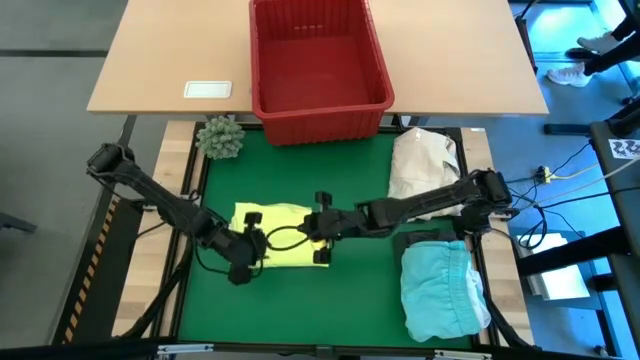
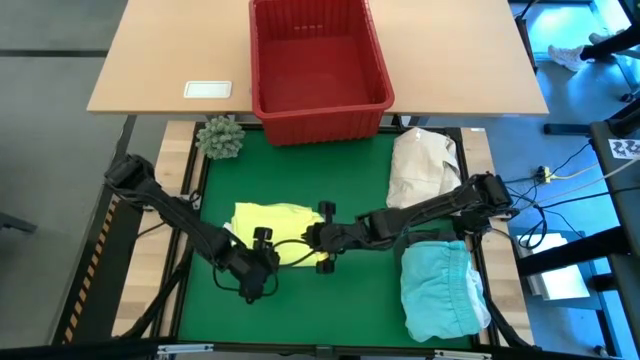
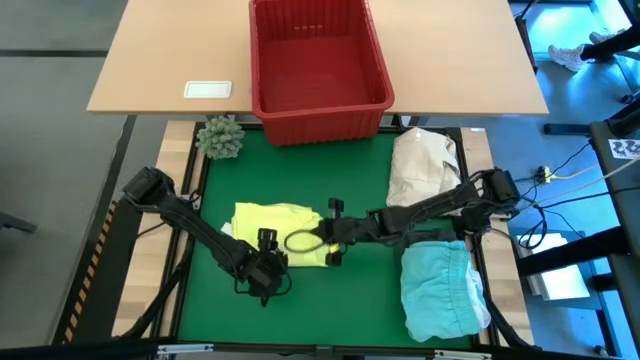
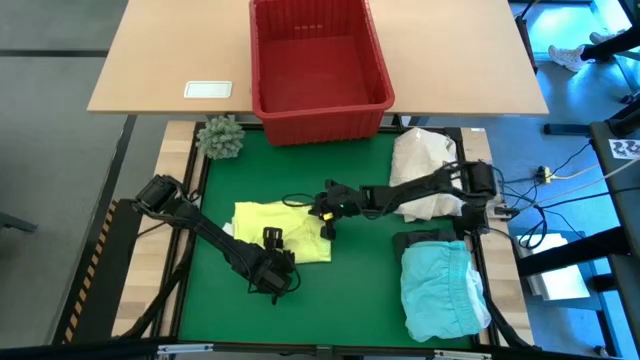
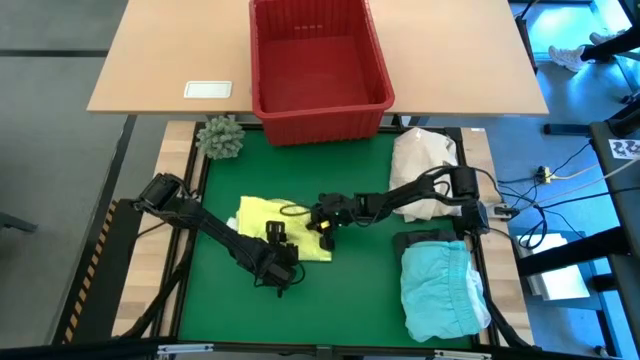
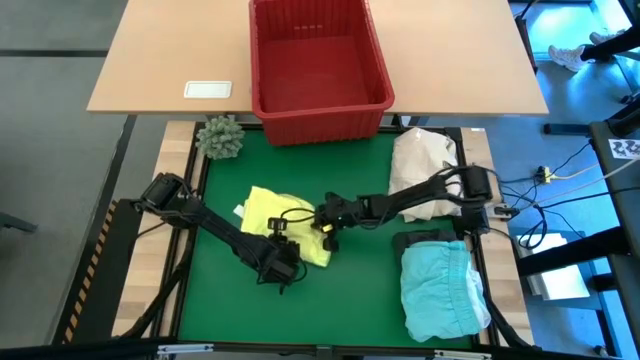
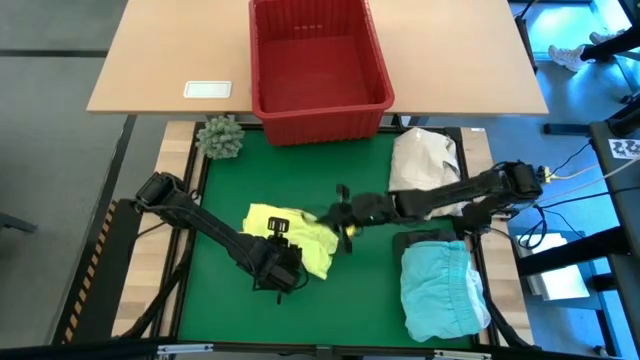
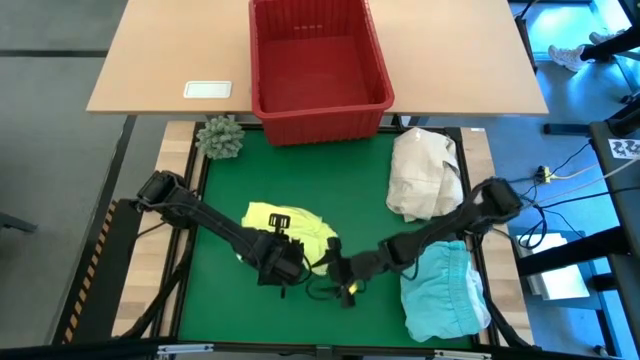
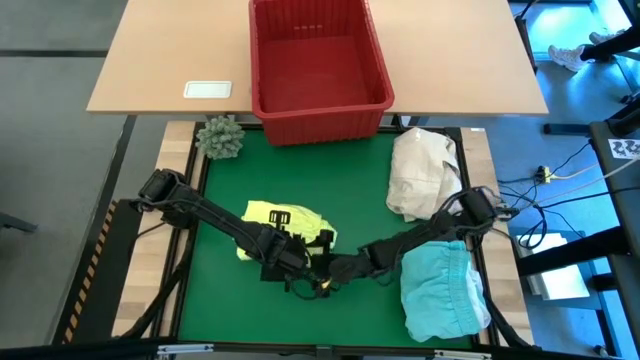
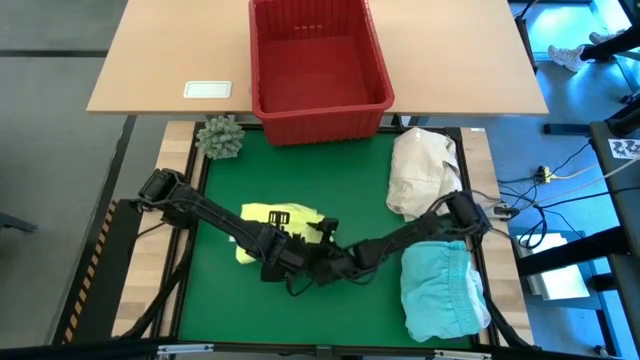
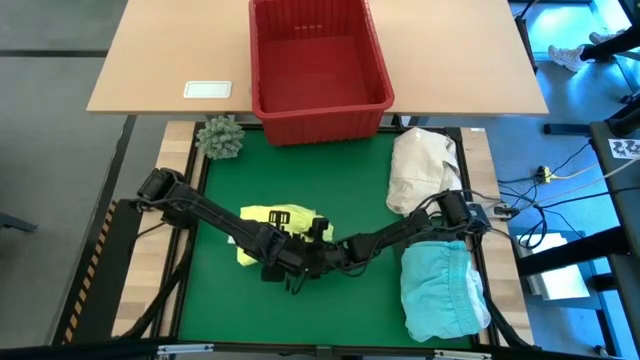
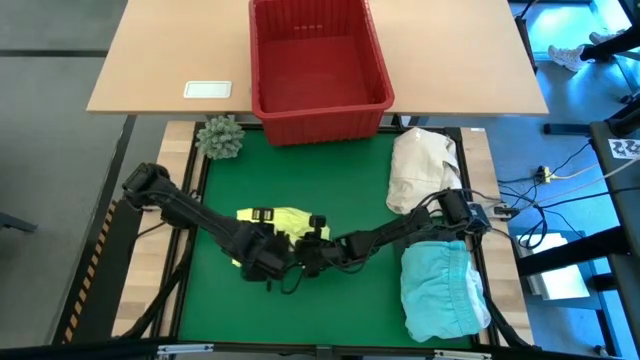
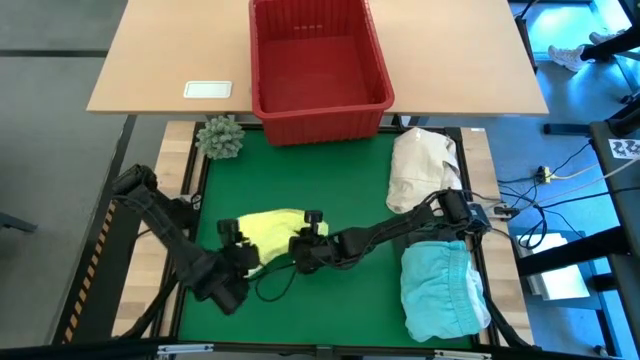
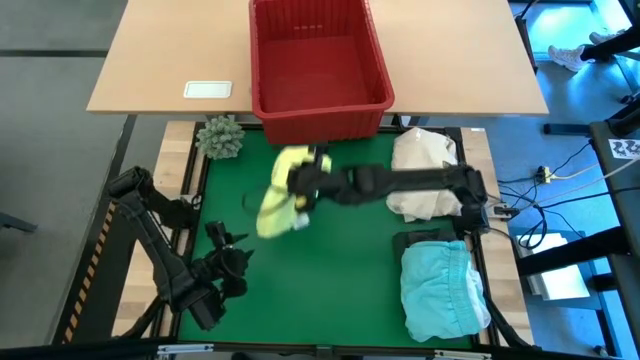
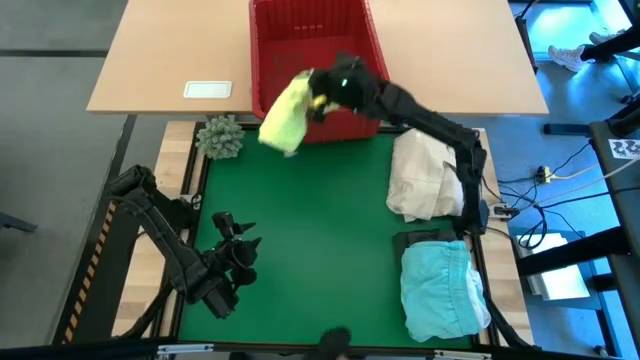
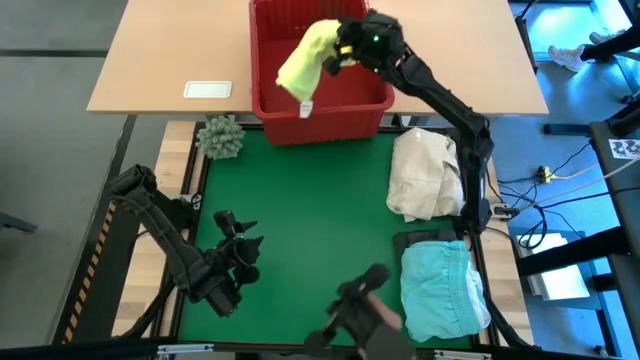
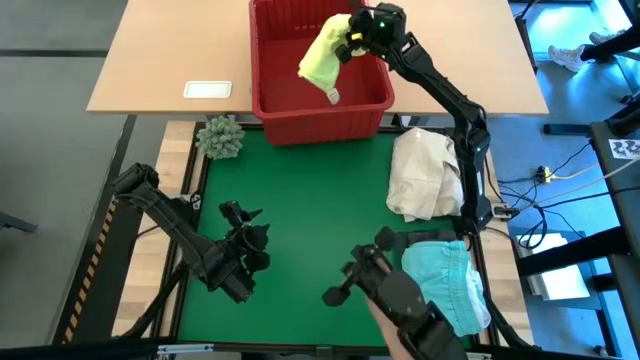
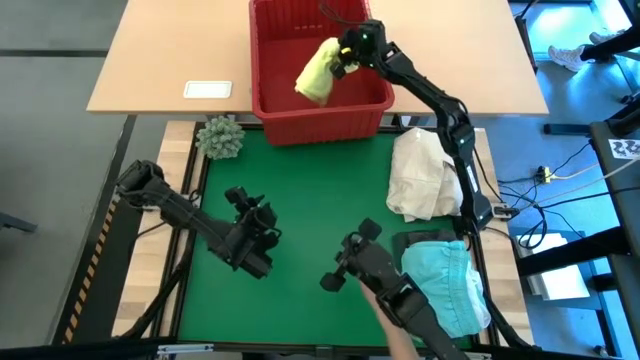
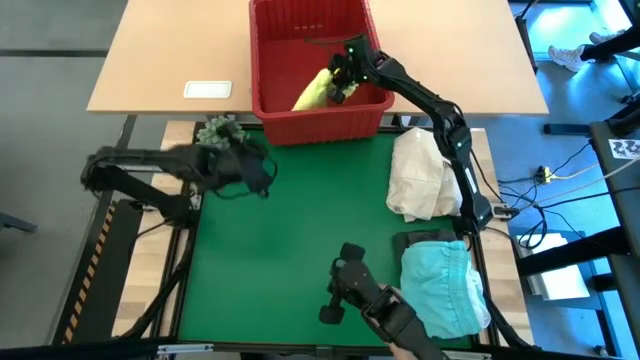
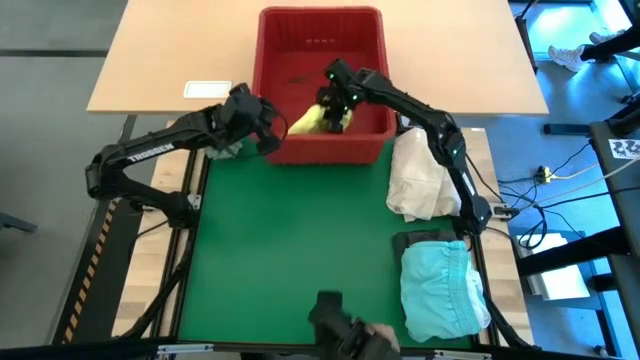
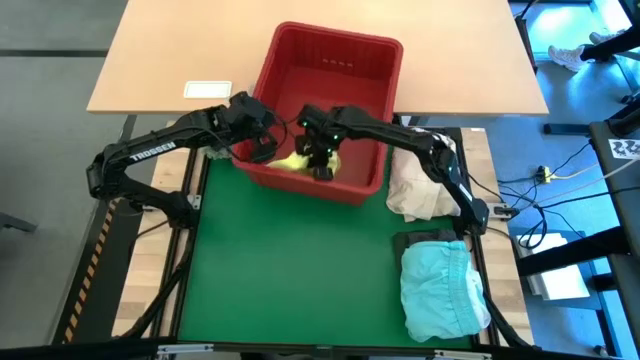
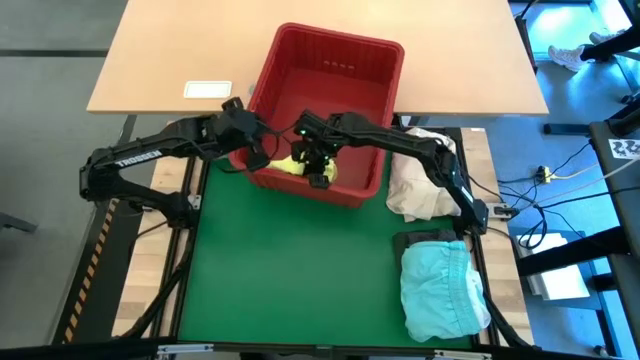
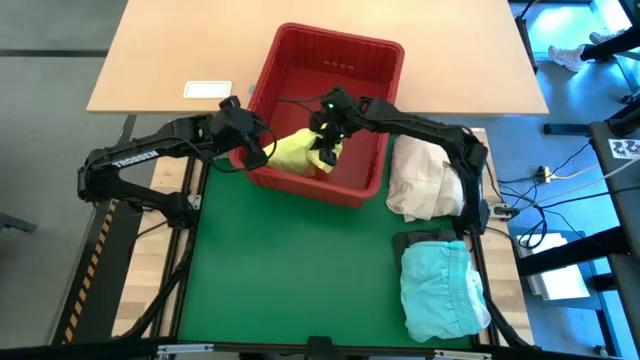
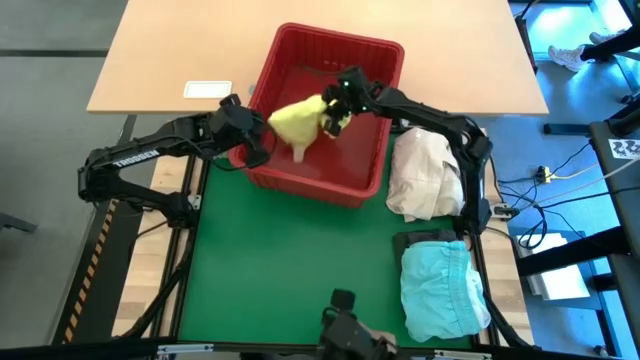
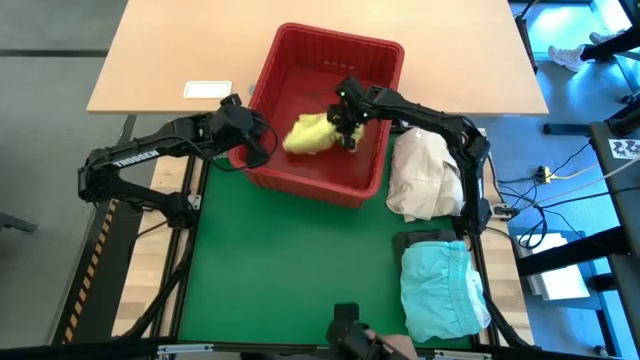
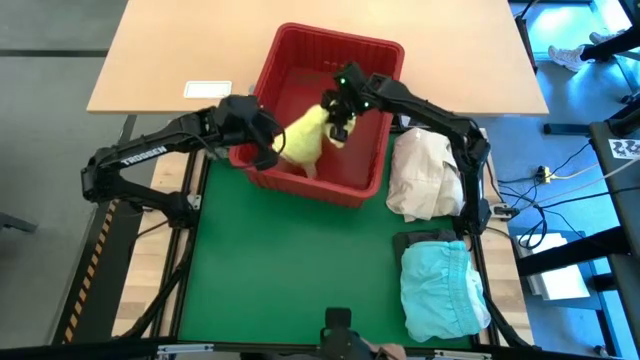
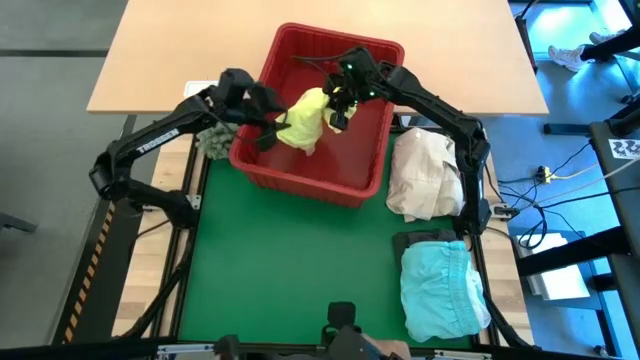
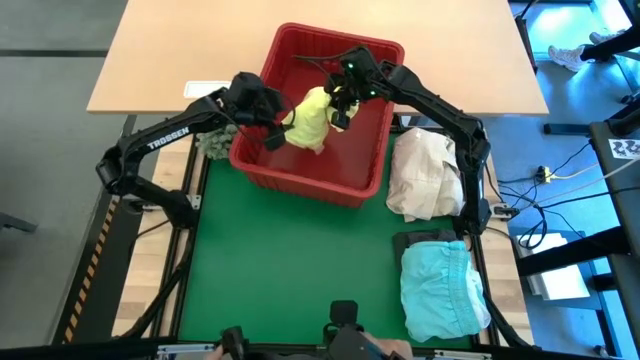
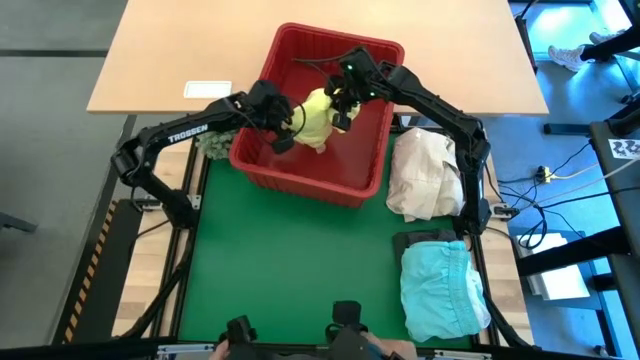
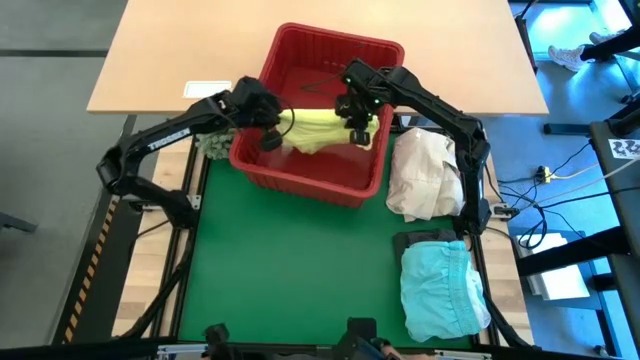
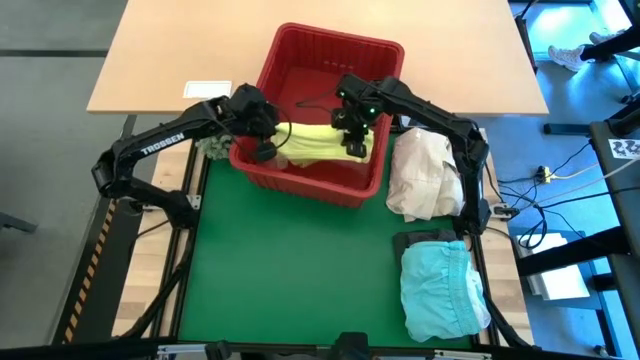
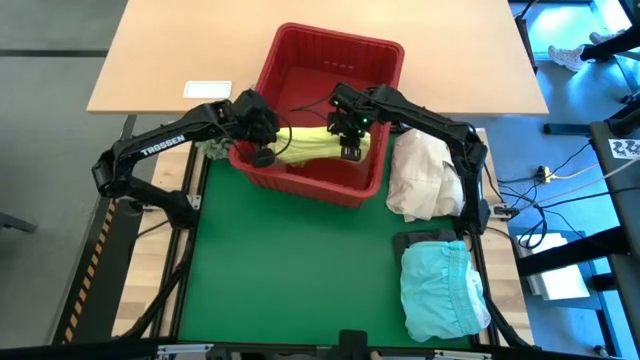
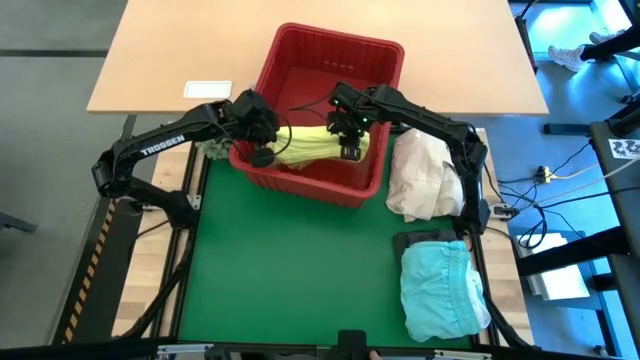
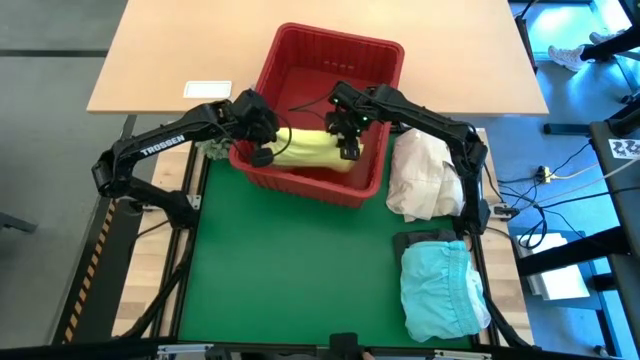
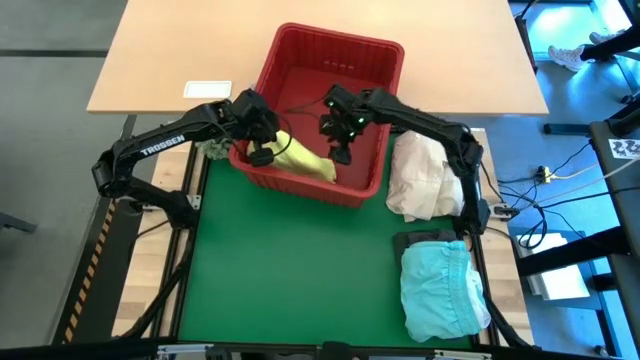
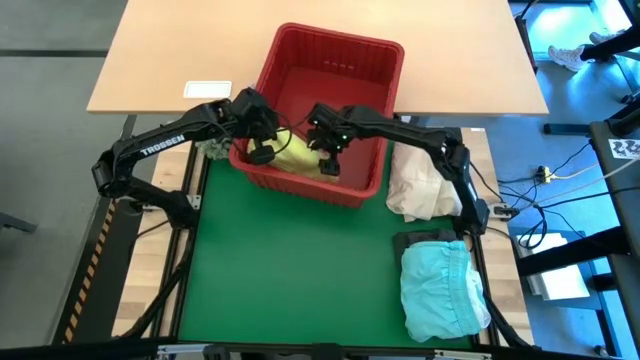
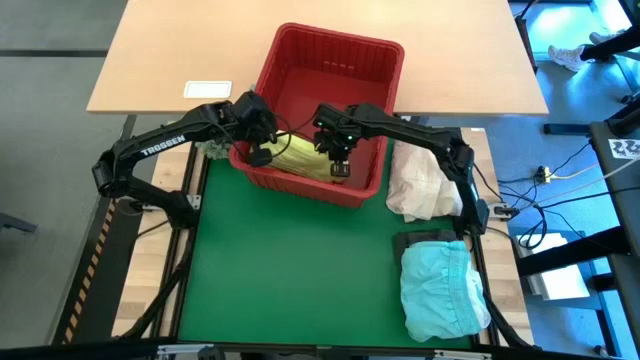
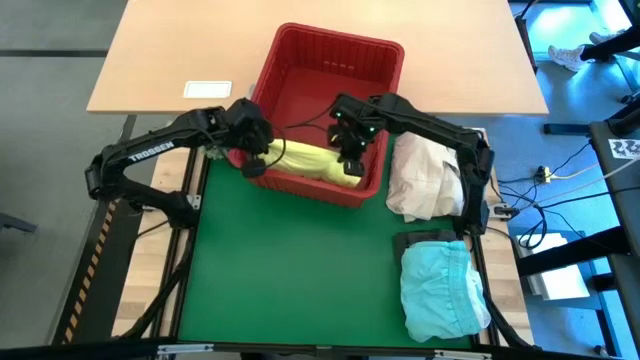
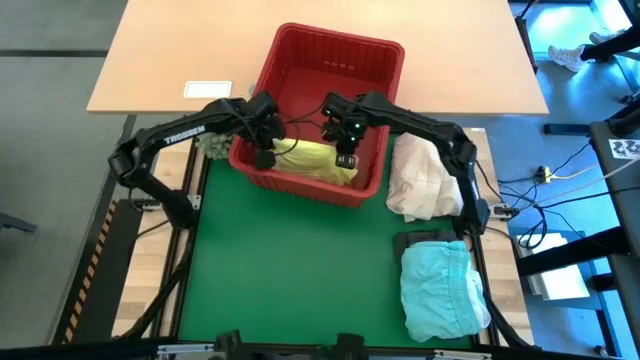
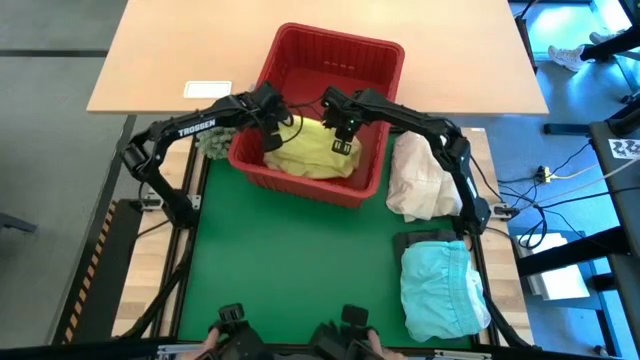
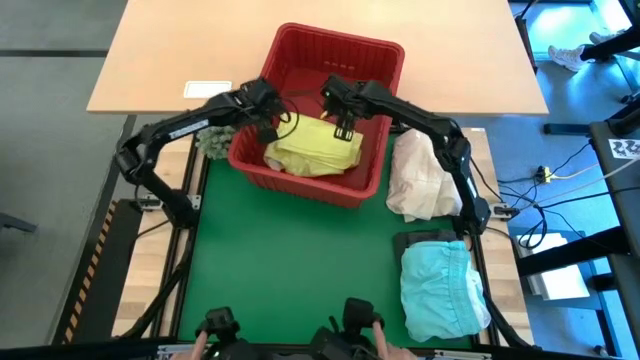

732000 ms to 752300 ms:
Task: Fold Laundry from Bin
Put the yellow shirt into the red bin

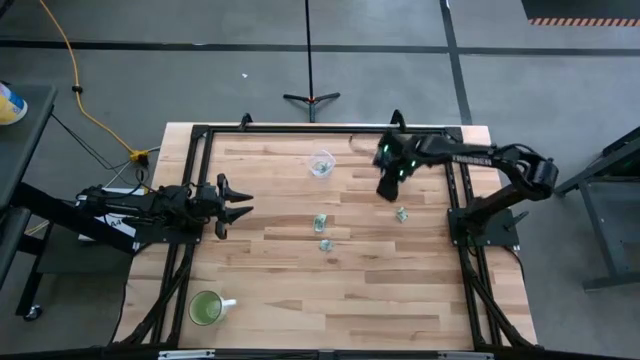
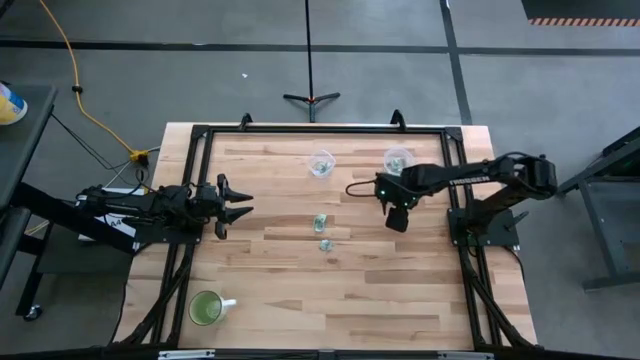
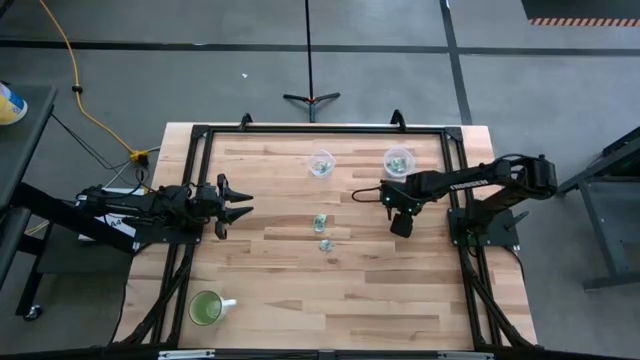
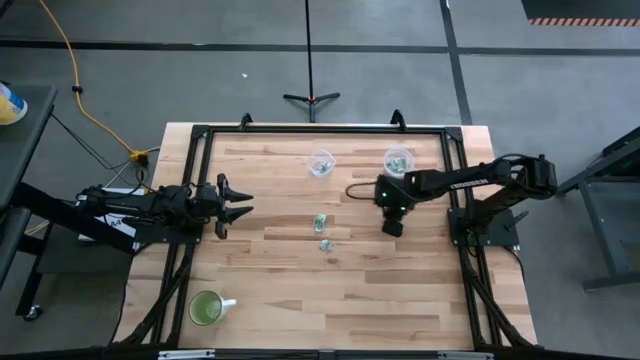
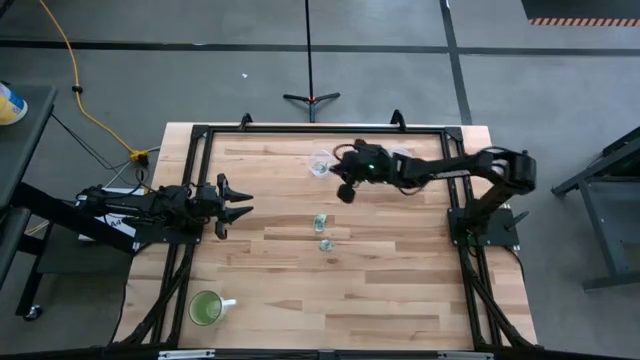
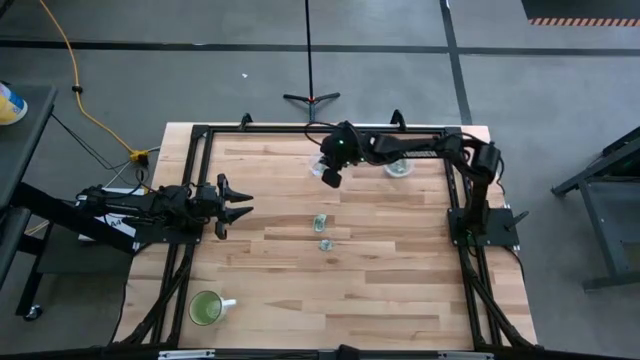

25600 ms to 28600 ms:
Task: Pick and place Stevia / Truvia into bins
Put the stevia packet into the left transparent container
